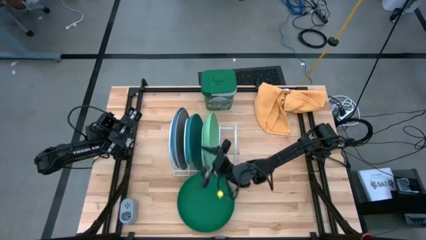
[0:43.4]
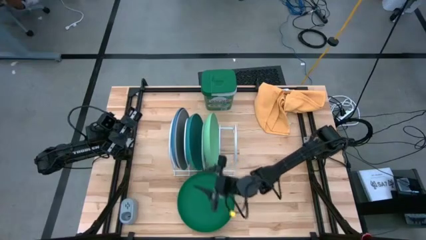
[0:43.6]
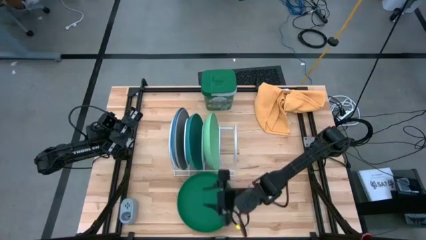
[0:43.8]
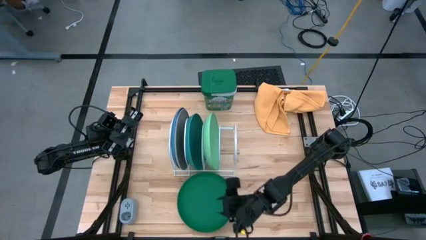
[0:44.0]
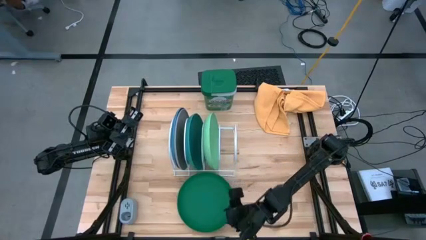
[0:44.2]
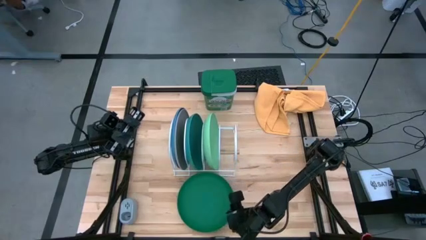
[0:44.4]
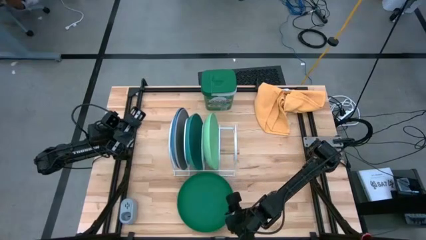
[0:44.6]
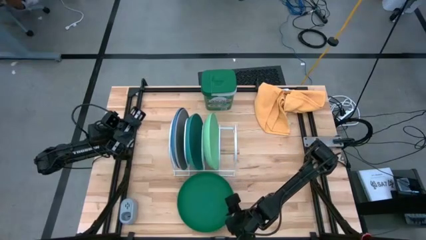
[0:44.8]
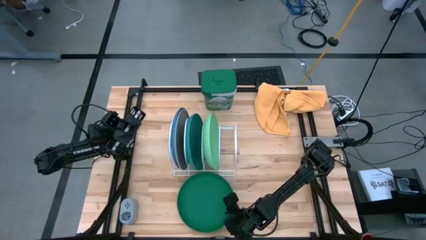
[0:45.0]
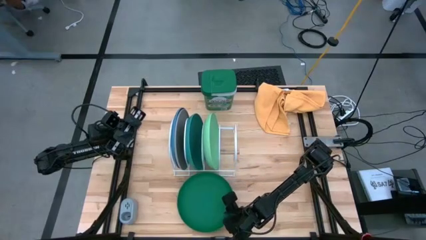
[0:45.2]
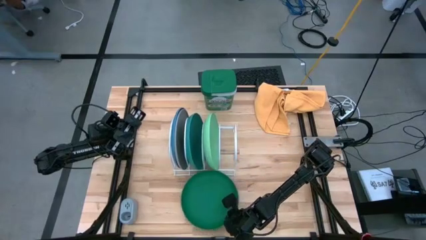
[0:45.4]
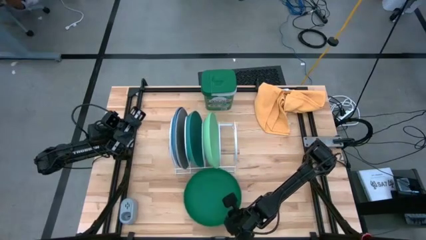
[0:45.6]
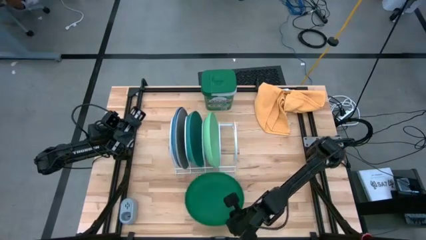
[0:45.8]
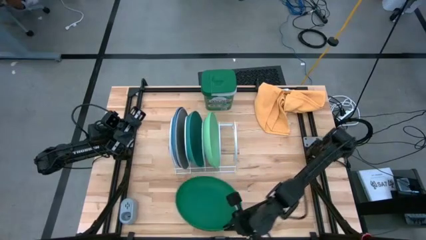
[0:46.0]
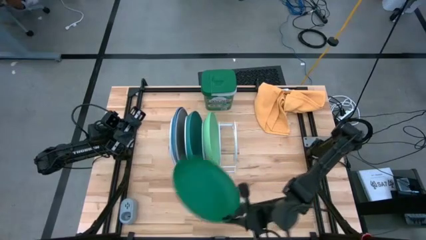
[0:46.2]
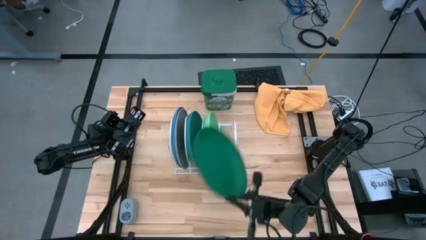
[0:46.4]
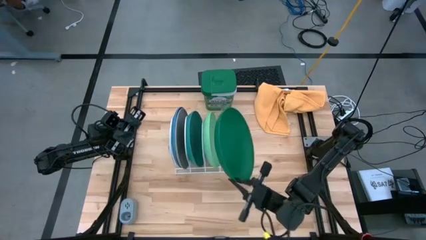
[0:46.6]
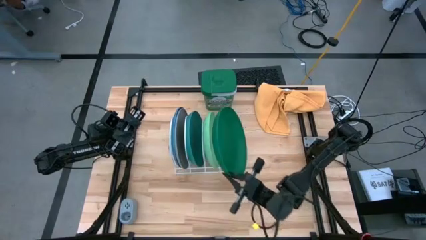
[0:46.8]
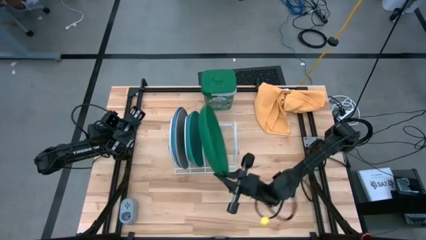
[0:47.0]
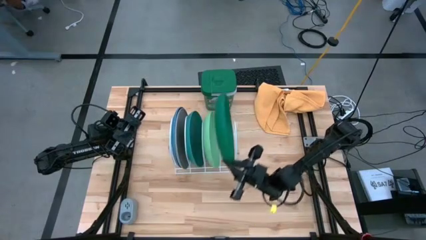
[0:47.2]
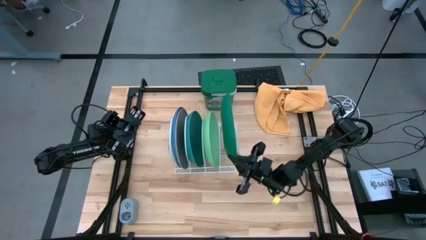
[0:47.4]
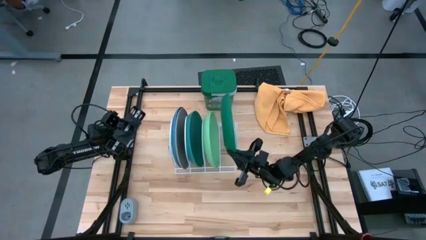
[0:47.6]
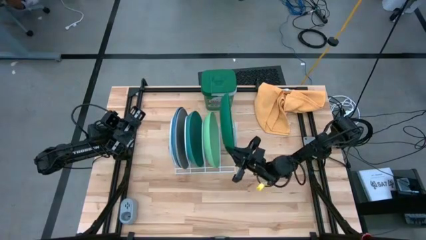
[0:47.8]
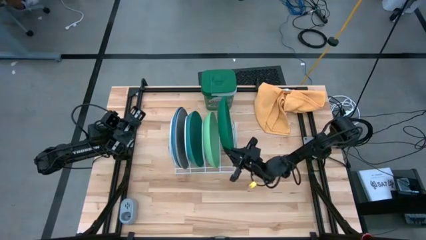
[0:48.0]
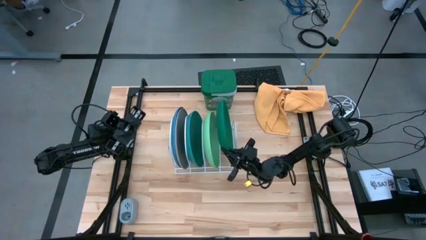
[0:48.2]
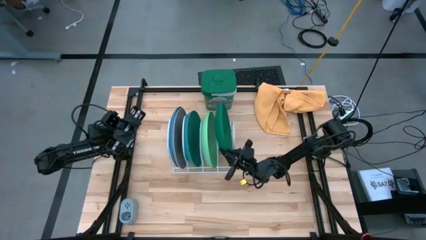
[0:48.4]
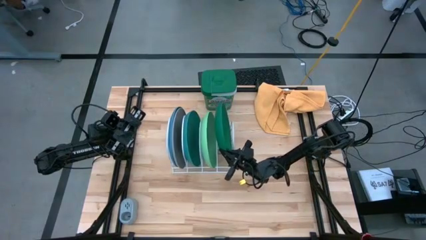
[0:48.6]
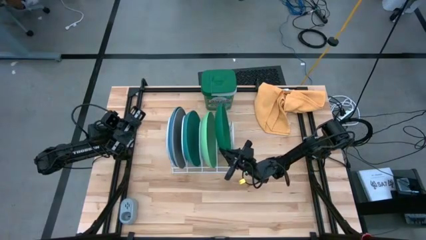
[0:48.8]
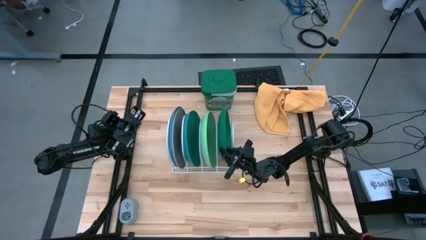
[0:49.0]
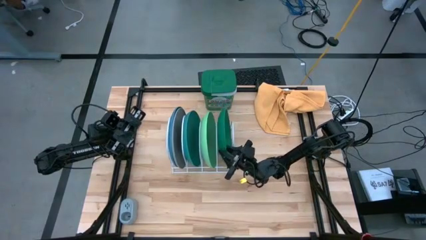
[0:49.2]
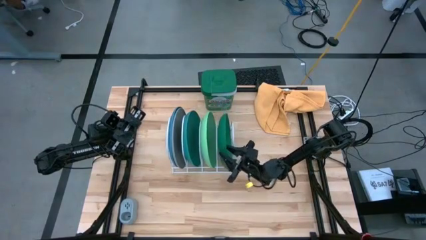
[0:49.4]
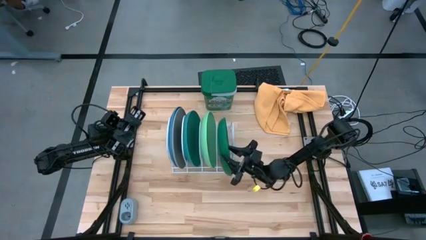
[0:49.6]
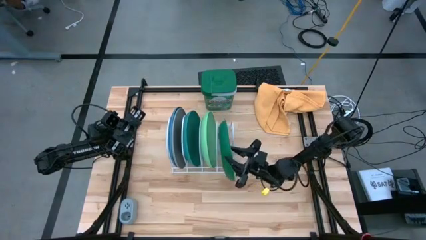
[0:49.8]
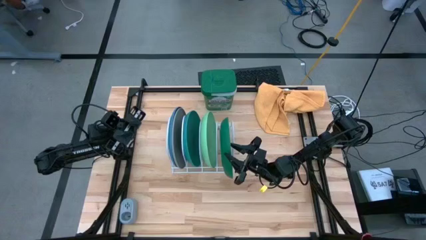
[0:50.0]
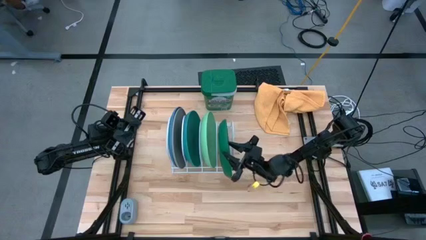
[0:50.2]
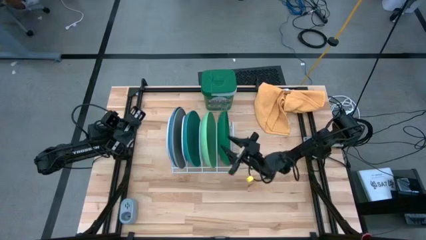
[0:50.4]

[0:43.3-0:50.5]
Task: Sort dishes
Put the dark green plate in the dish rack

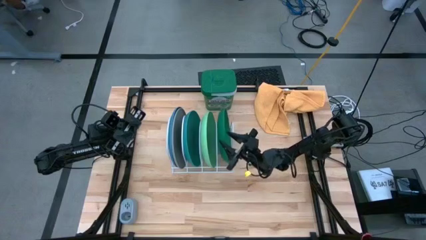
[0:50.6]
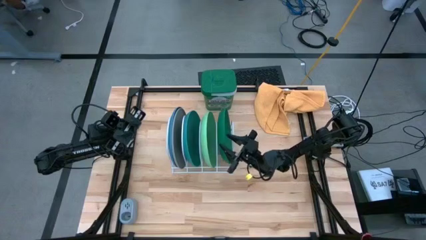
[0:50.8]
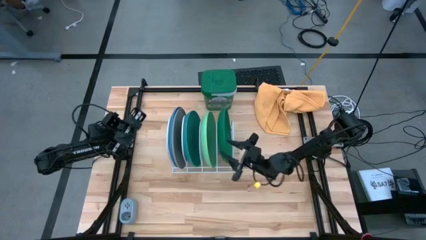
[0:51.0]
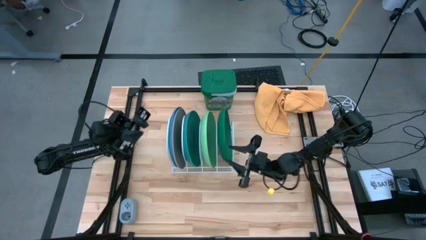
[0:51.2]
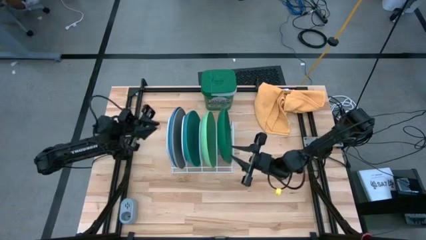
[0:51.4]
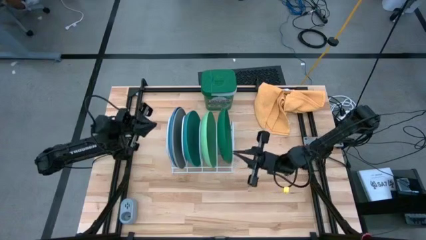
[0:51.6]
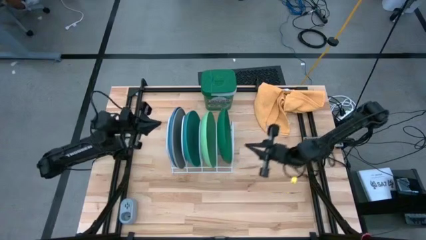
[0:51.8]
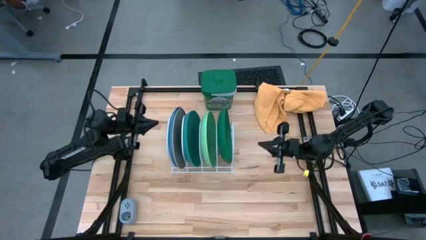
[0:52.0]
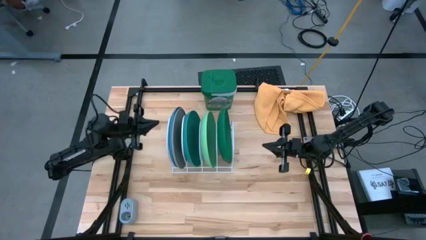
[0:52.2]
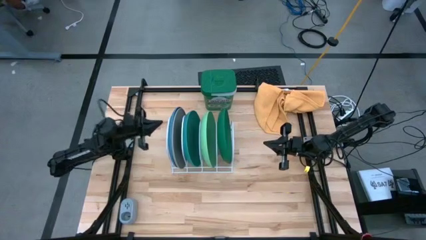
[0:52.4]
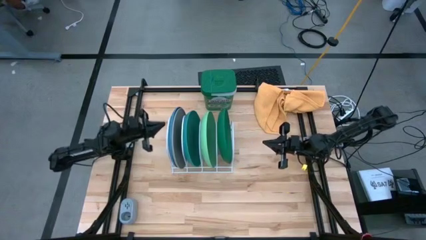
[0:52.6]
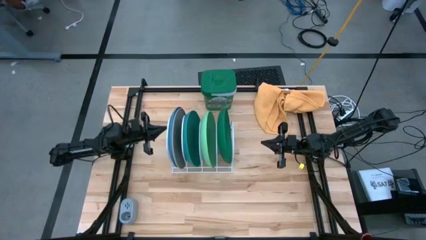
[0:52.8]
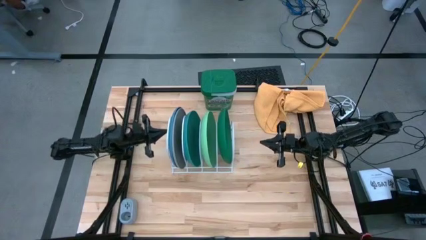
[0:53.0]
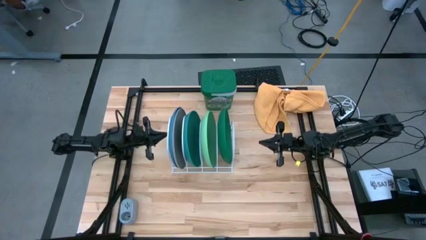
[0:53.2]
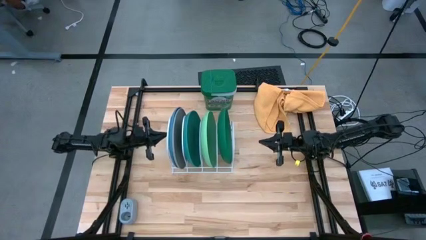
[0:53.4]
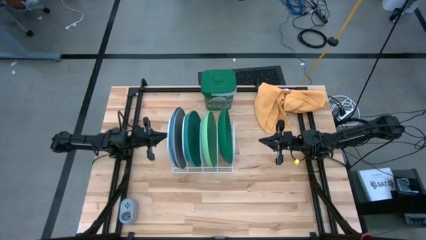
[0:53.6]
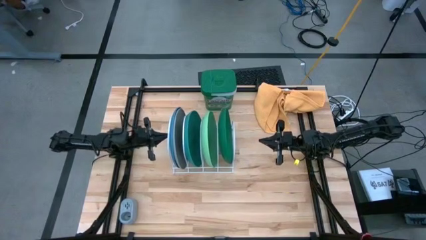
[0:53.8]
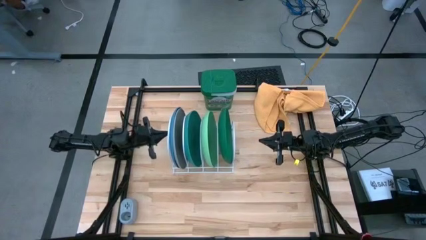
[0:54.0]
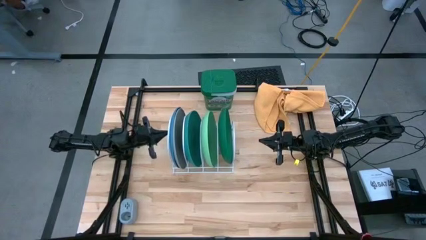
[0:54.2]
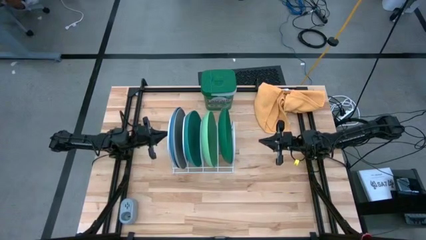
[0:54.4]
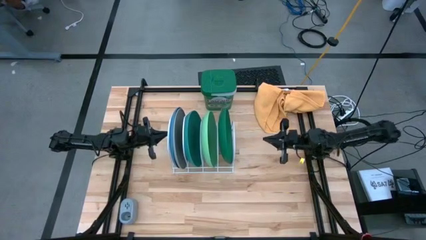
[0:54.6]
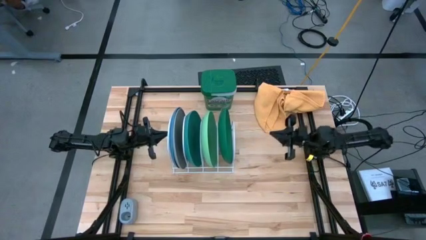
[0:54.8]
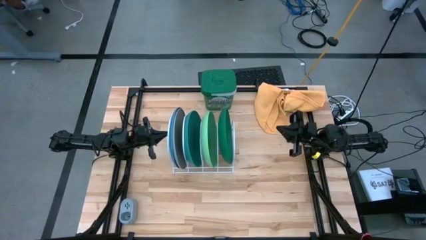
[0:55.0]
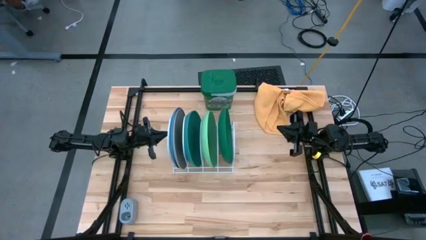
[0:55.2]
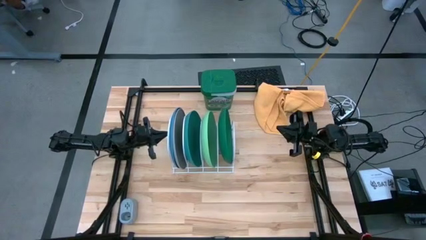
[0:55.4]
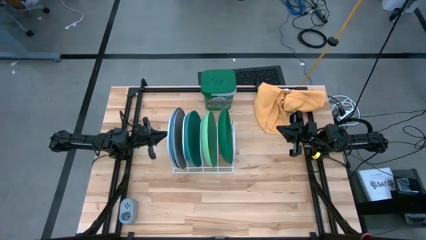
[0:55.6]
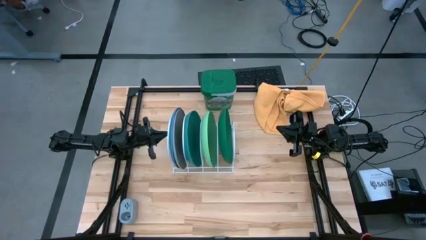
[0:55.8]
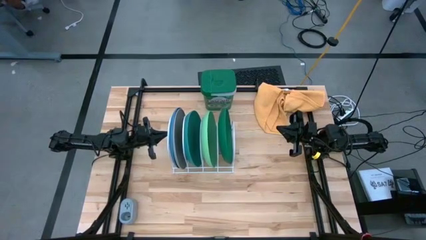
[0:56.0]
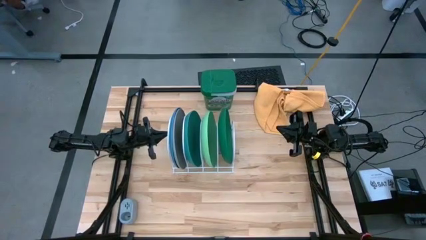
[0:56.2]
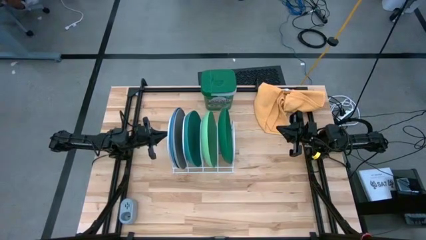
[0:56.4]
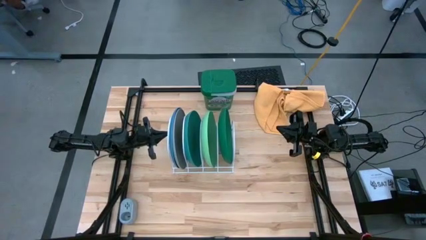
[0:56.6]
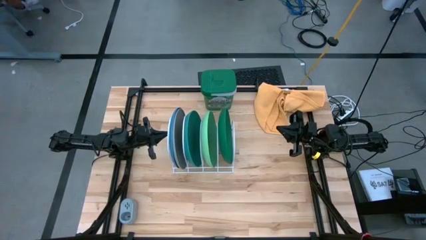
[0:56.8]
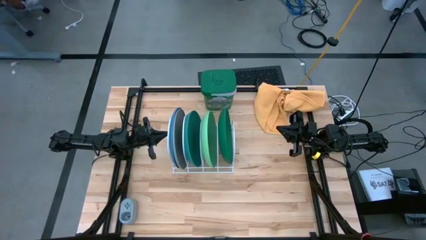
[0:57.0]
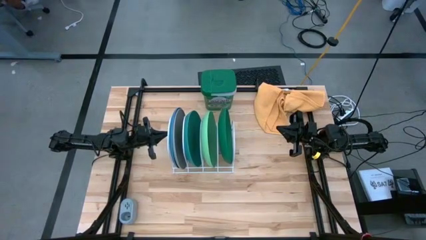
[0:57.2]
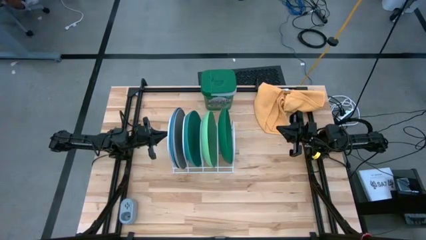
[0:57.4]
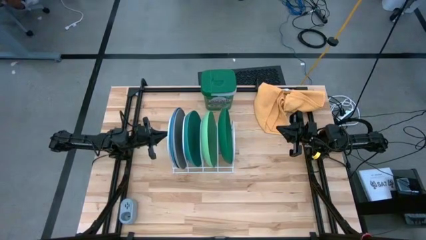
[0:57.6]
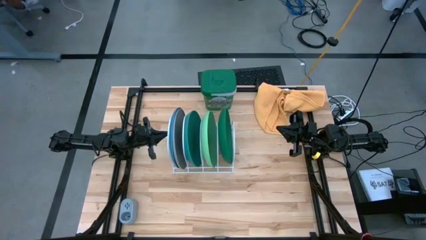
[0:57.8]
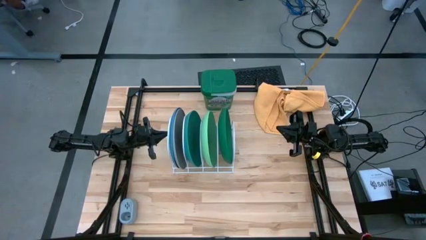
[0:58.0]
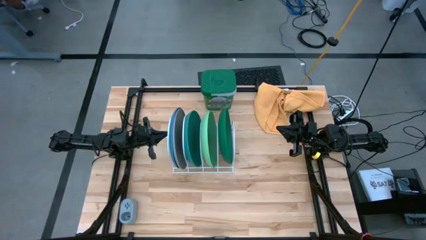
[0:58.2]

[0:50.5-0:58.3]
Return to Home Position
